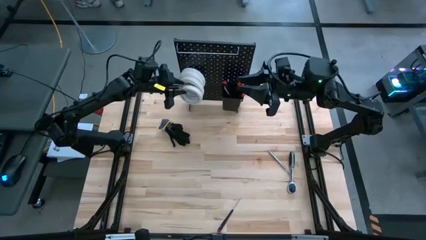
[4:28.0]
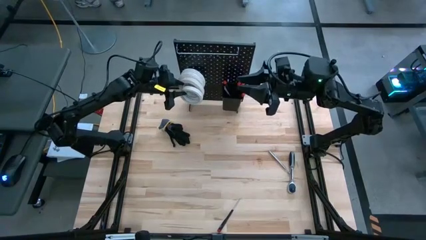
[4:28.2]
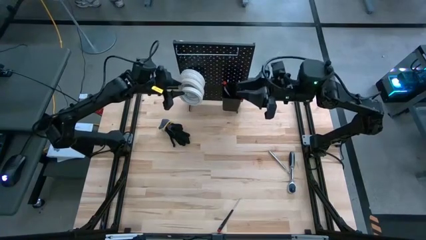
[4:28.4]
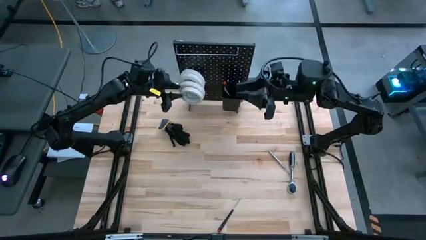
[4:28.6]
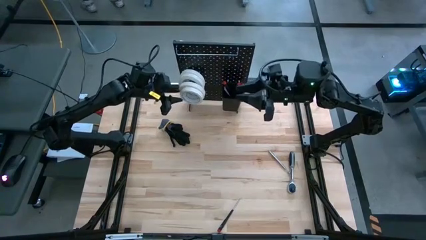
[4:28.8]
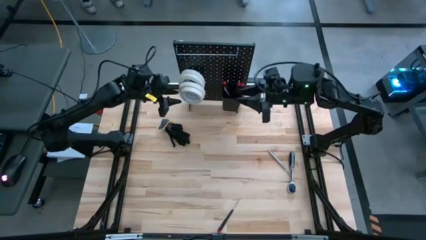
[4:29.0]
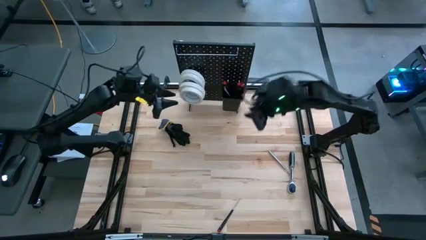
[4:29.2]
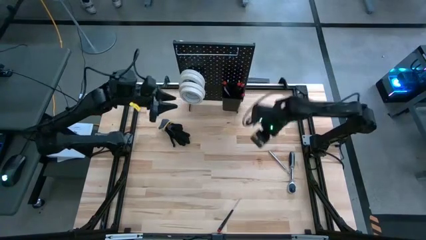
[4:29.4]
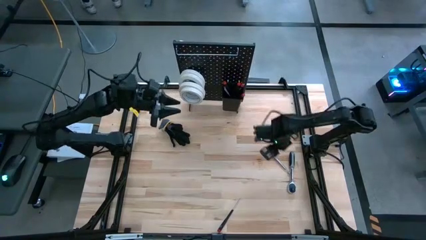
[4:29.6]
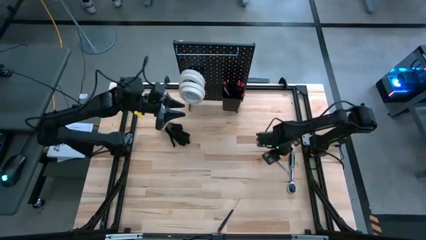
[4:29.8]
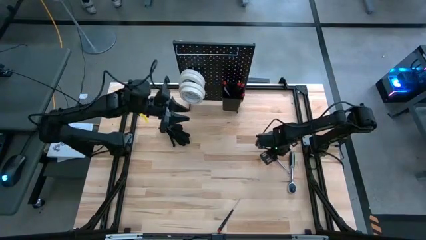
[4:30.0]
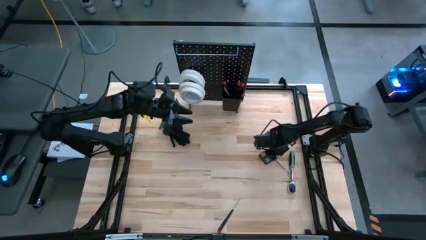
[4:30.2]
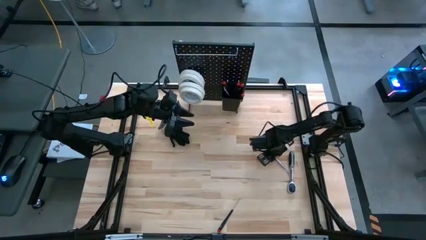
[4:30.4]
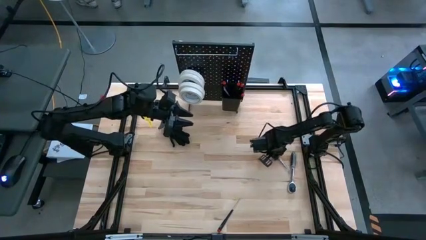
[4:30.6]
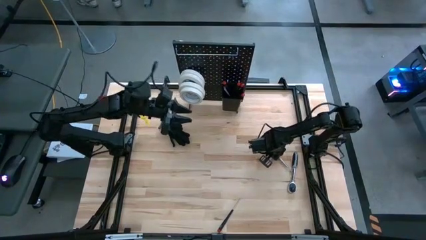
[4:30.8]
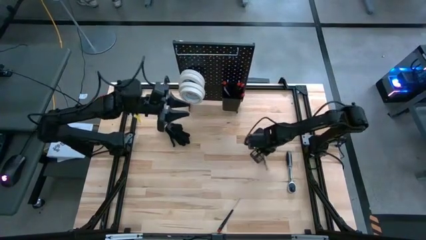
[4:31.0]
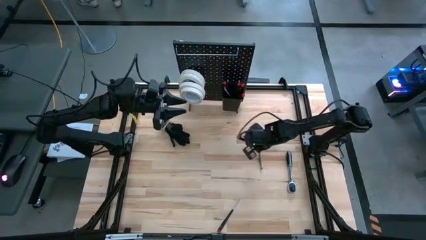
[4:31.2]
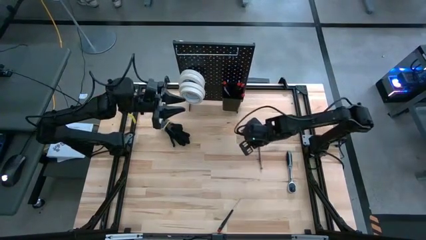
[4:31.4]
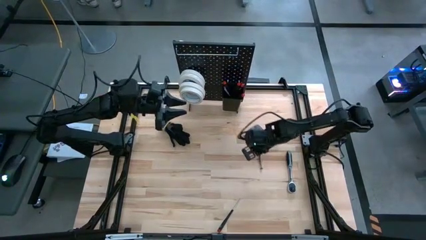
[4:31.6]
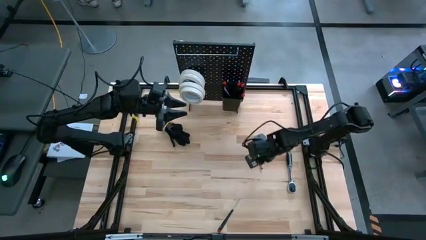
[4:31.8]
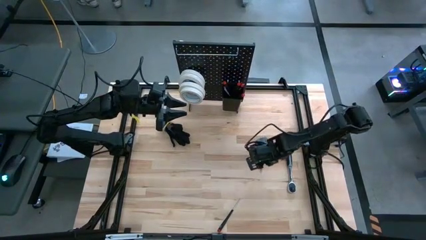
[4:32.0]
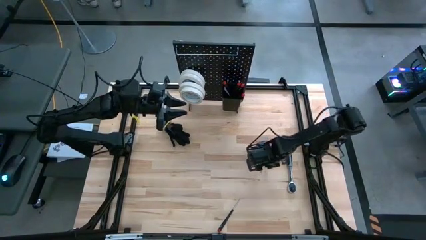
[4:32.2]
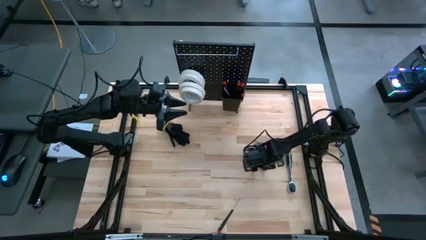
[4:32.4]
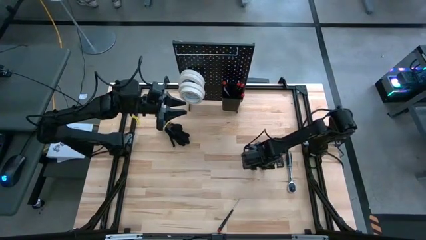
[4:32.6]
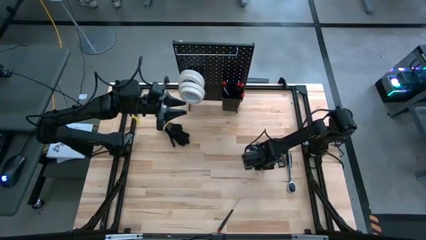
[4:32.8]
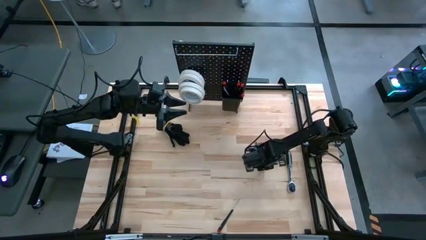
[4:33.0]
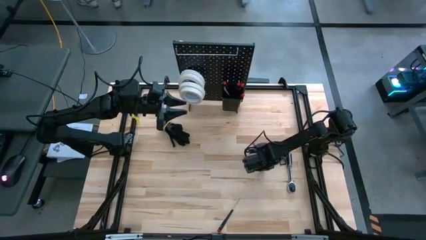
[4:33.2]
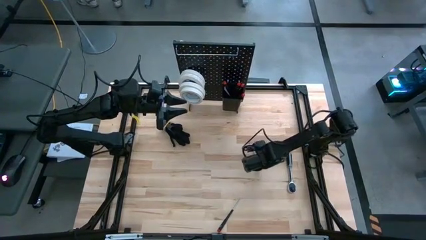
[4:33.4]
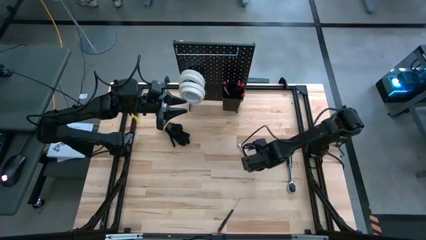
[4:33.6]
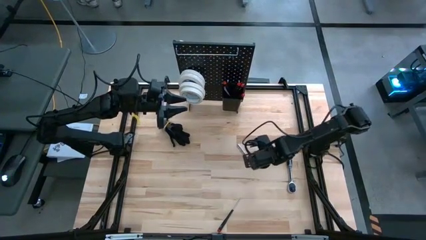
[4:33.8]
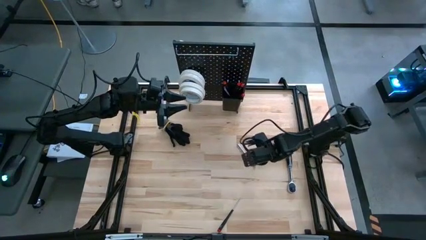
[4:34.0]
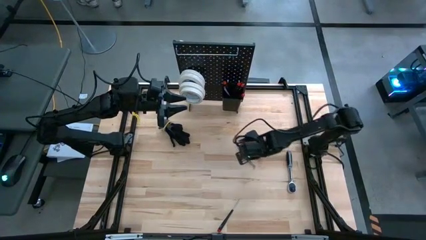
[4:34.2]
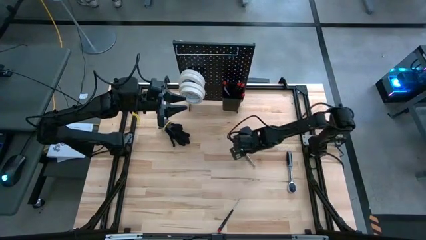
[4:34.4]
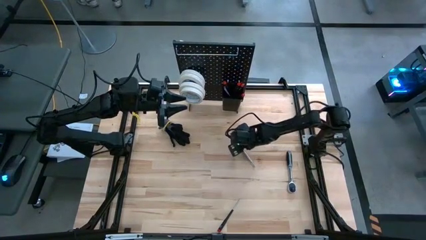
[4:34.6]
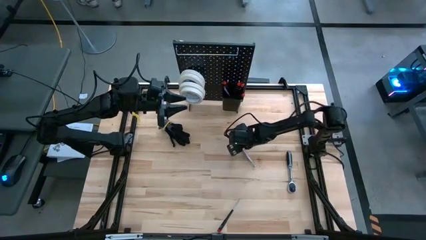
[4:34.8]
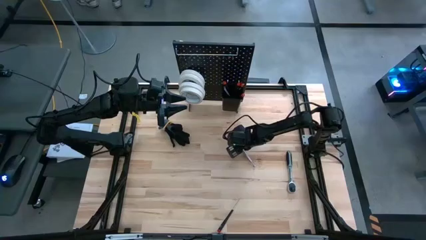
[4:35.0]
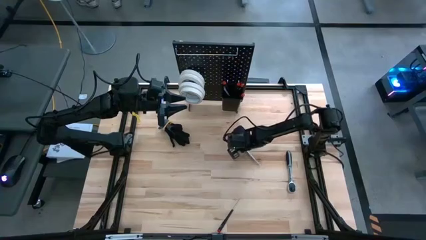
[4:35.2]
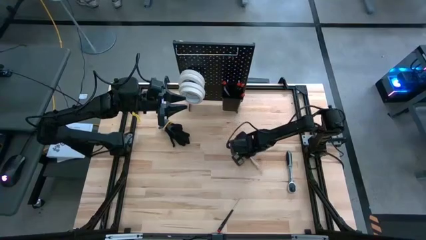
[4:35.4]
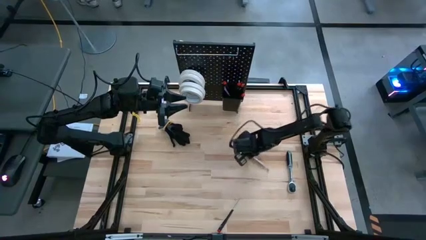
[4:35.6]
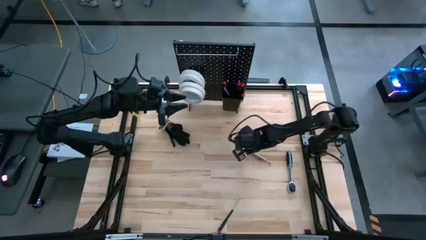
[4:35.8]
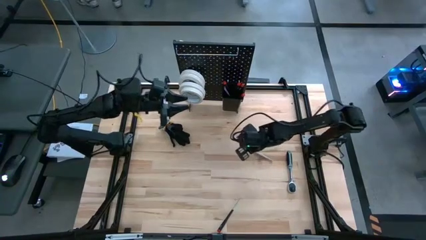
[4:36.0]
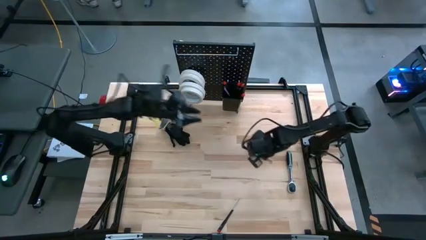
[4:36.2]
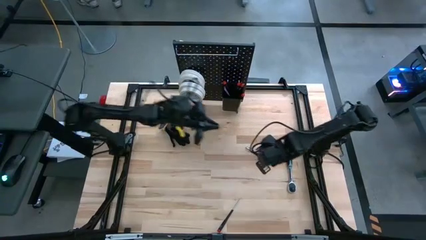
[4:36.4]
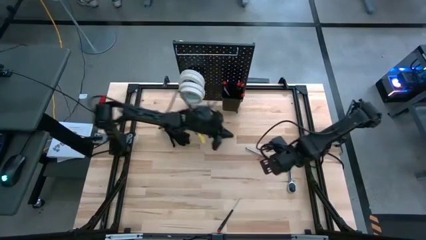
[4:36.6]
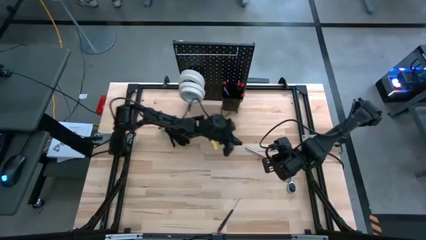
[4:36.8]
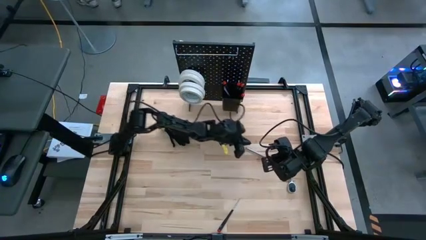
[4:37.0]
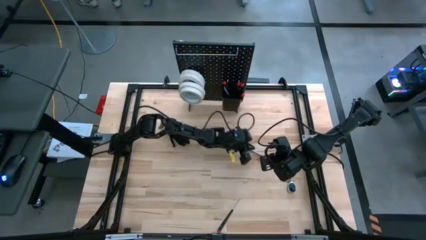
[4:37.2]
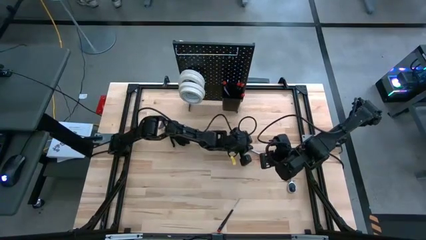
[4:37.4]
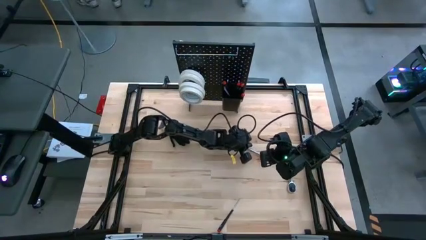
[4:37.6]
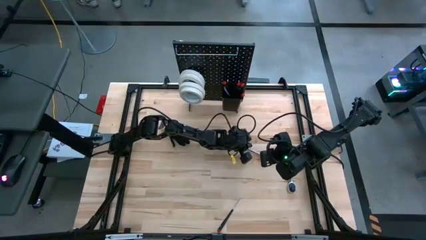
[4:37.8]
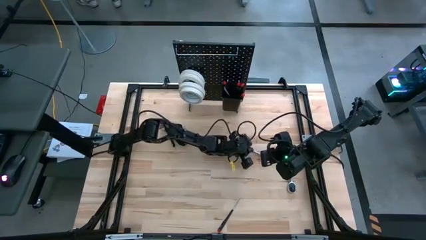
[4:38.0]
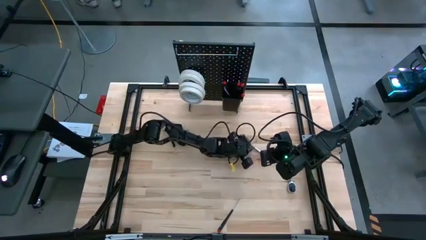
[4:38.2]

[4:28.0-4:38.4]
Task: Hang tools onto peg board
Put the silver magnetic telescoping into the black bin on the peg board

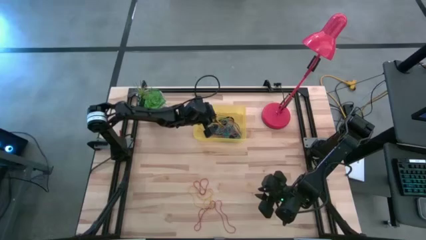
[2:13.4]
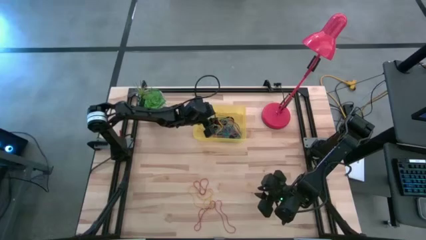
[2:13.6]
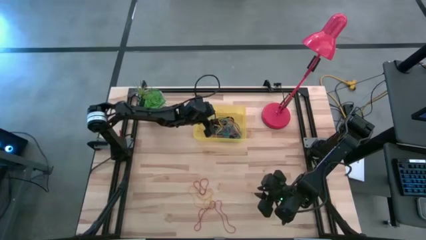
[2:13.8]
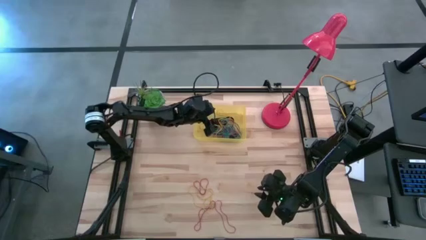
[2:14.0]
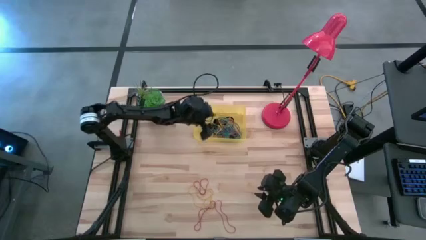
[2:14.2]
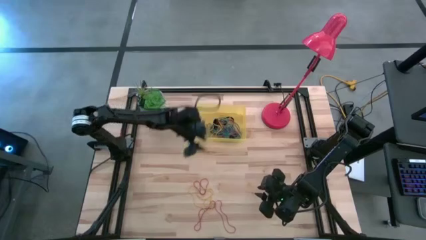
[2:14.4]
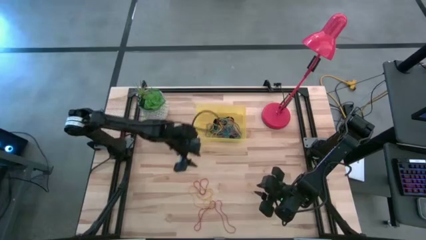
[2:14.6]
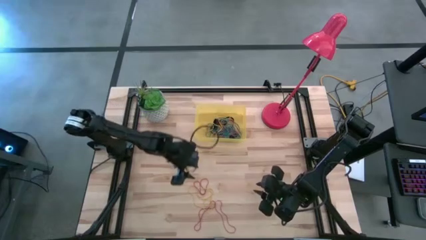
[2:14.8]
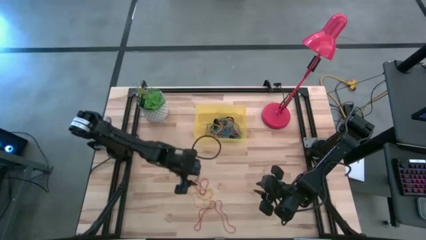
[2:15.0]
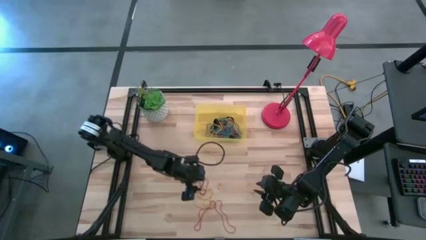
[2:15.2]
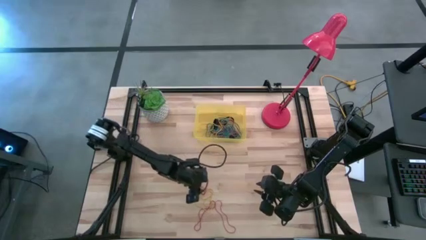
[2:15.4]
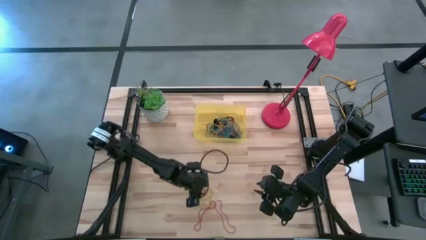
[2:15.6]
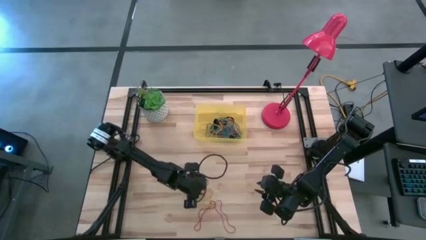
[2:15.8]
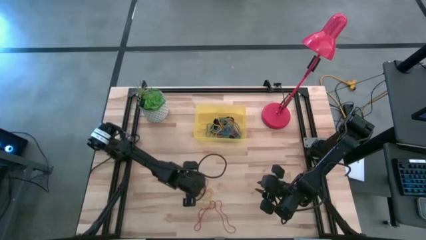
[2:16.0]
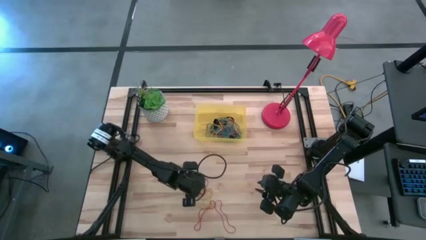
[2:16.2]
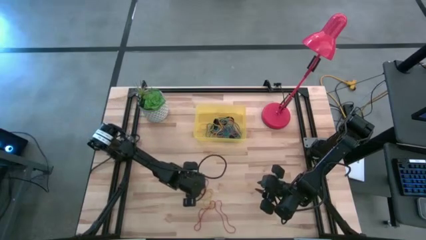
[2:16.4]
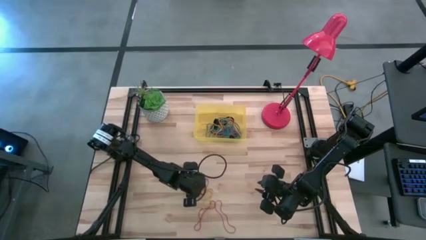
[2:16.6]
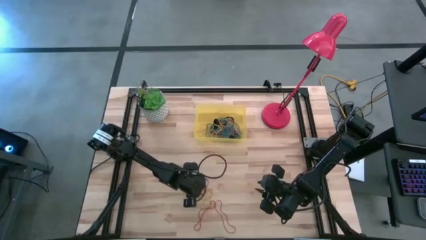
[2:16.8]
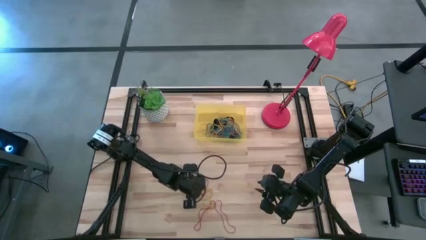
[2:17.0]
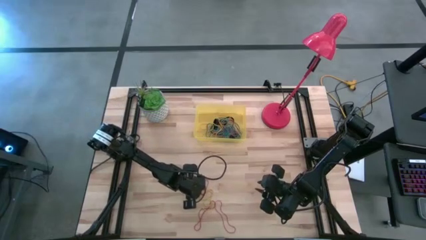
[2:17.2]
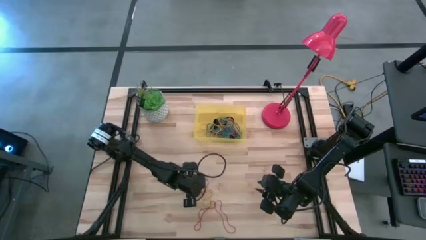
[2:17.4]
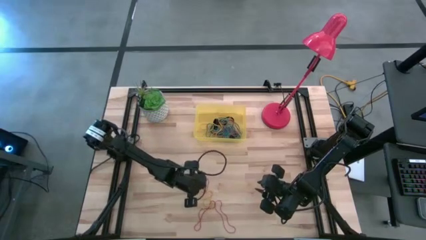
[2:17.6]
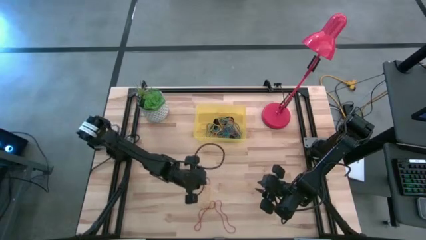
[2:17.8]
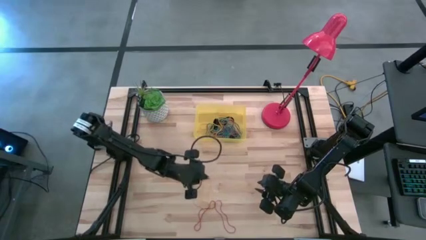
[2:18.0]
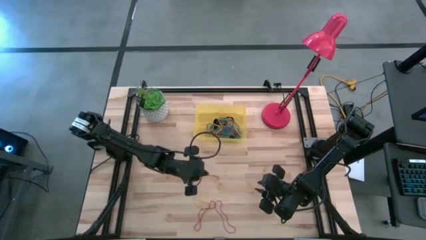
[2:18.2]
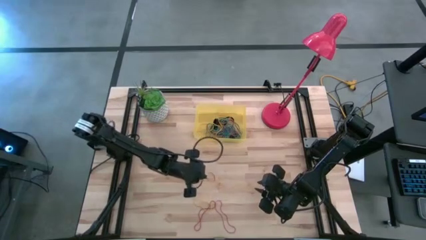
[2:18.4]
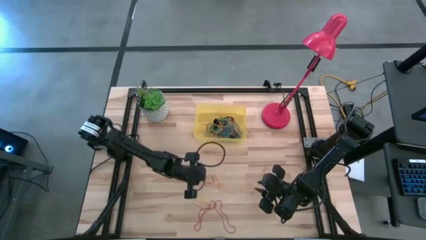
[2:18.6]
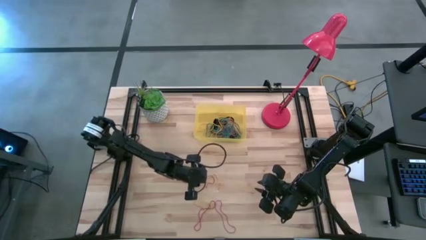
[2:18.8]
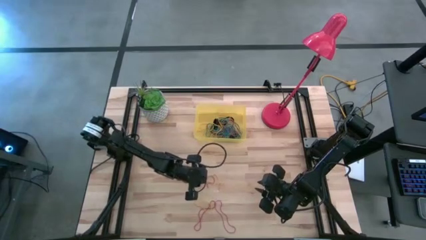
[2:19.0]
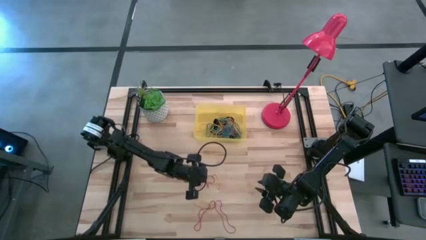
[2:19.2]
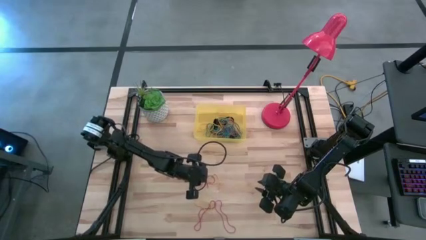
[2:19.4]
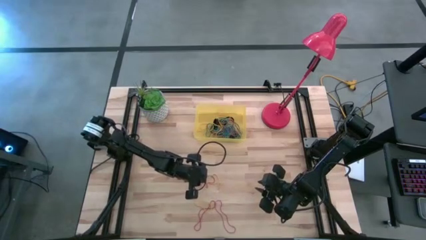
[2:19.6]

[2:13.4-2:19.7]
Task: Pick and place rubber bands into bin
Put the yellow rubber band into the yellow bin
